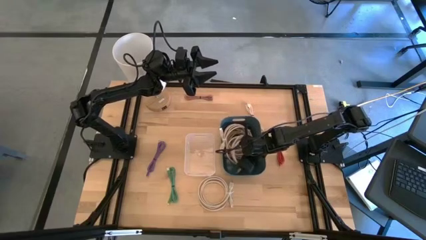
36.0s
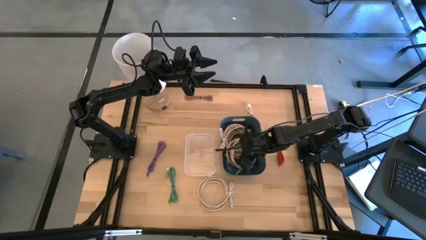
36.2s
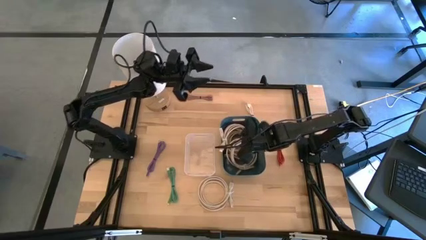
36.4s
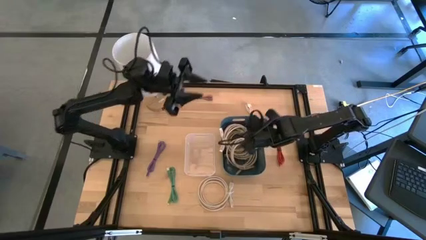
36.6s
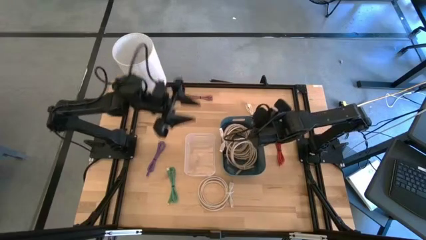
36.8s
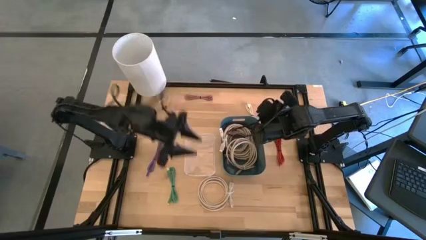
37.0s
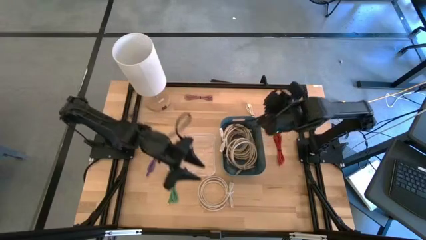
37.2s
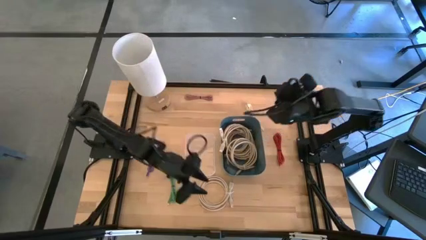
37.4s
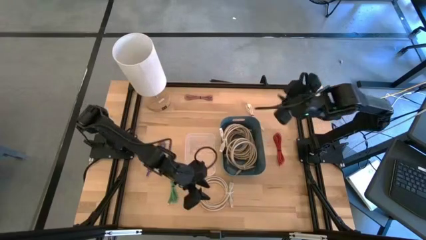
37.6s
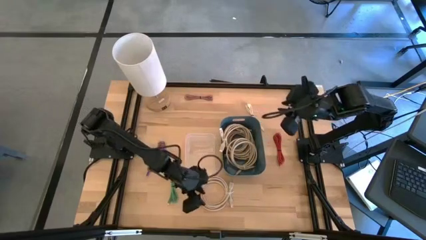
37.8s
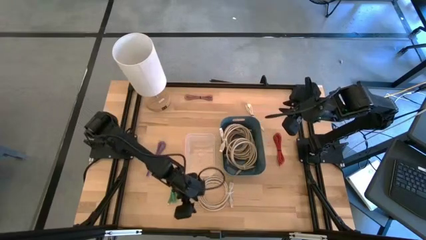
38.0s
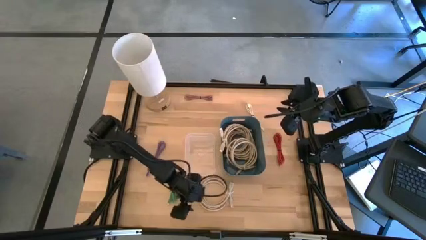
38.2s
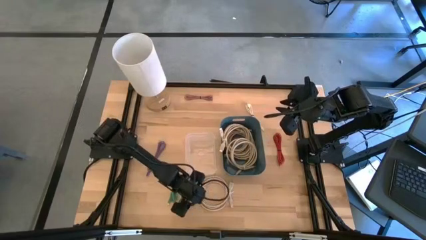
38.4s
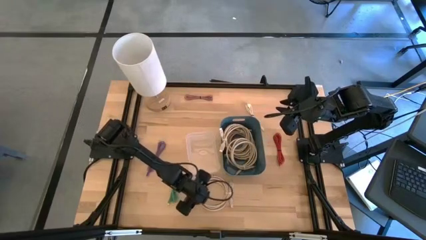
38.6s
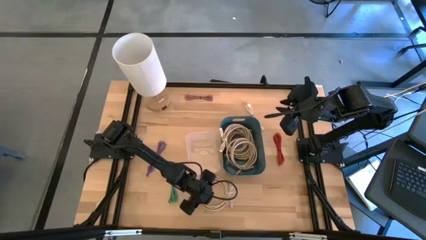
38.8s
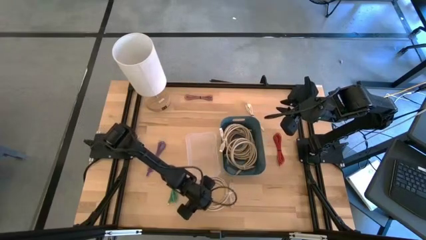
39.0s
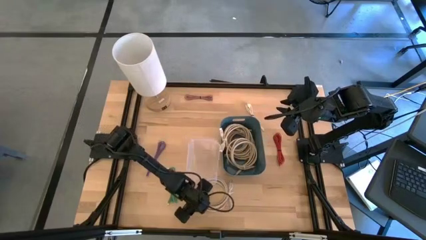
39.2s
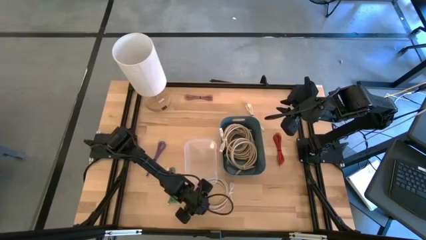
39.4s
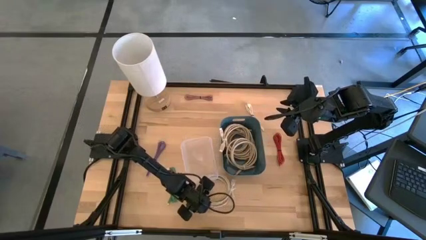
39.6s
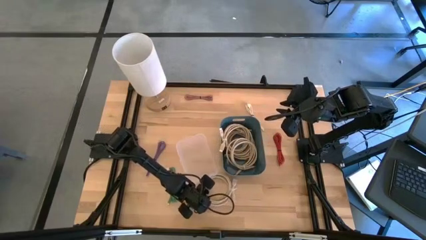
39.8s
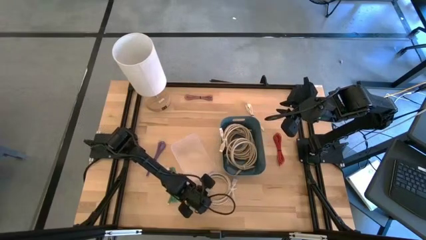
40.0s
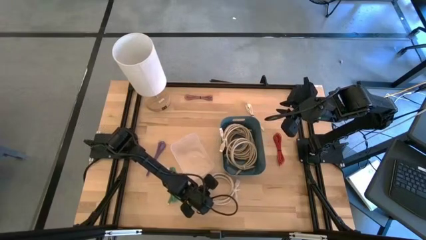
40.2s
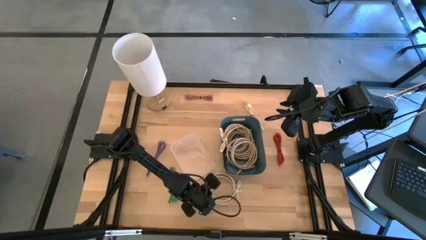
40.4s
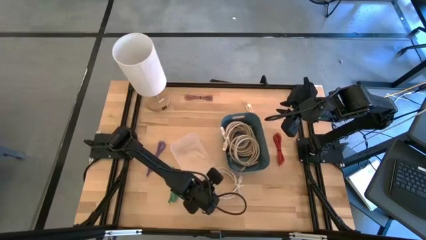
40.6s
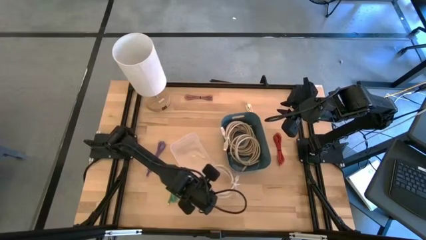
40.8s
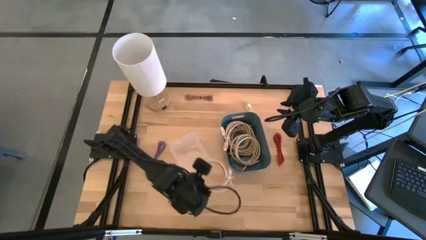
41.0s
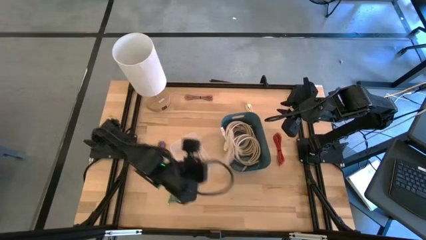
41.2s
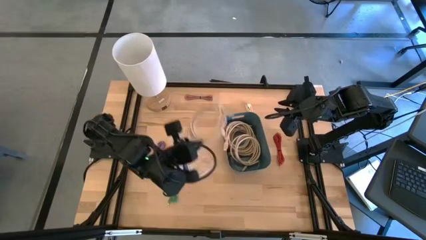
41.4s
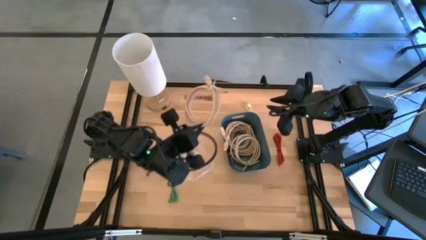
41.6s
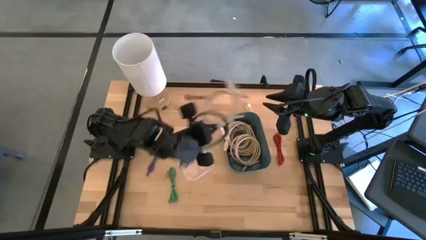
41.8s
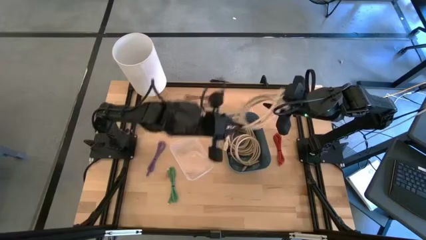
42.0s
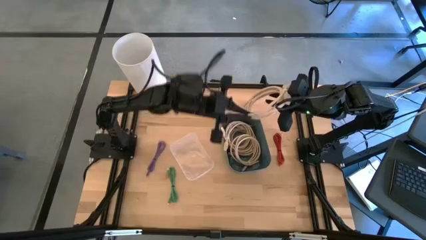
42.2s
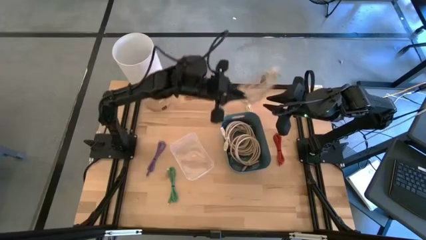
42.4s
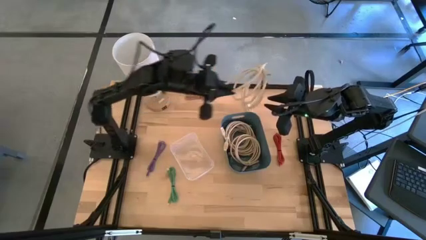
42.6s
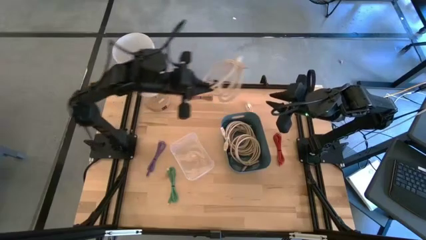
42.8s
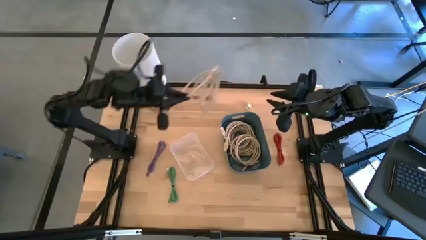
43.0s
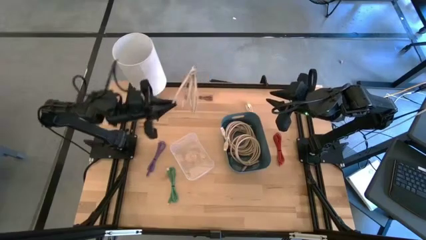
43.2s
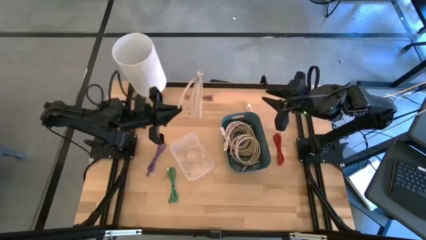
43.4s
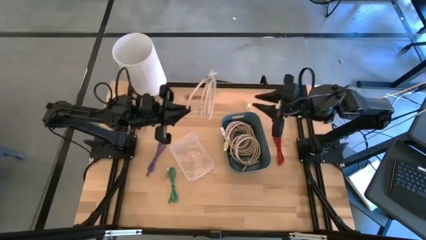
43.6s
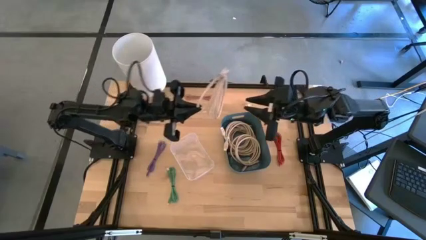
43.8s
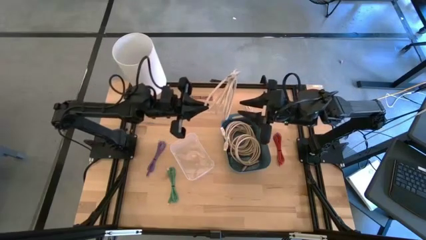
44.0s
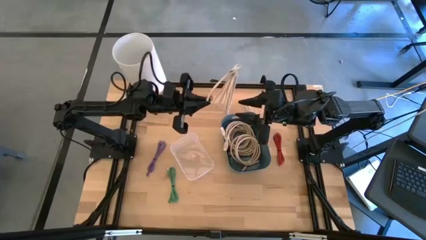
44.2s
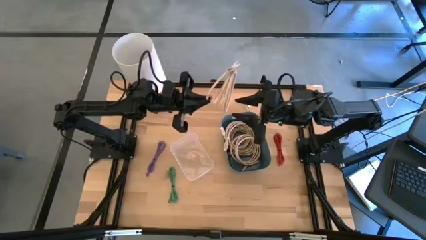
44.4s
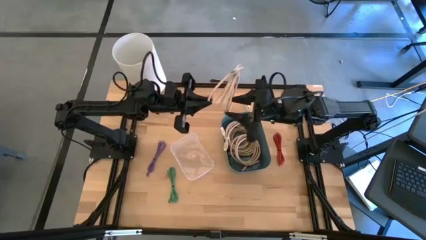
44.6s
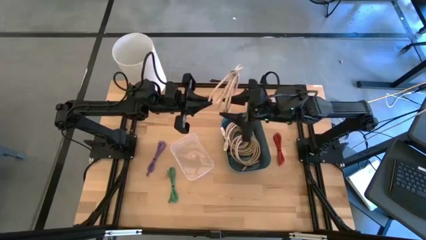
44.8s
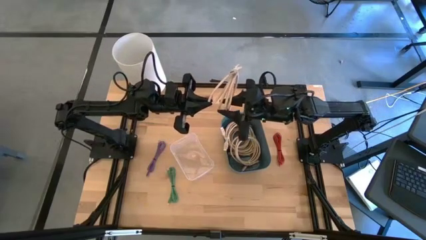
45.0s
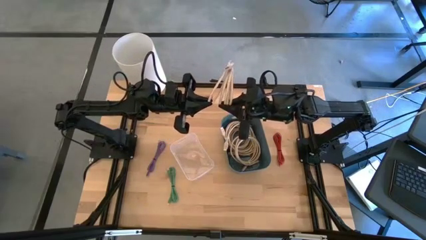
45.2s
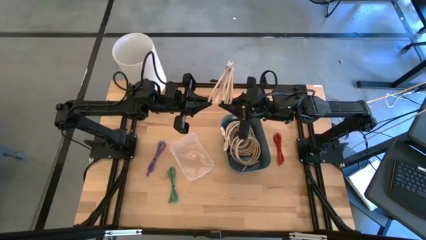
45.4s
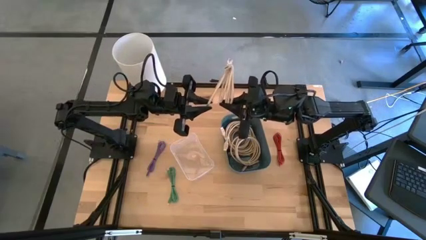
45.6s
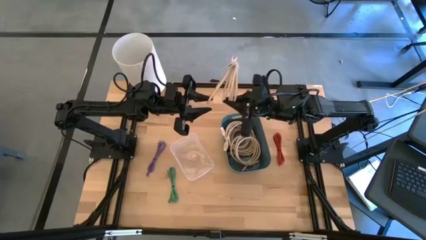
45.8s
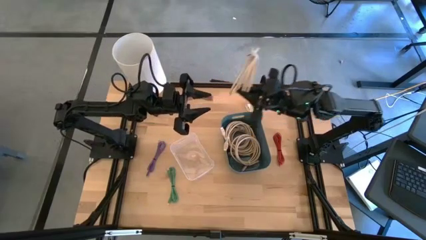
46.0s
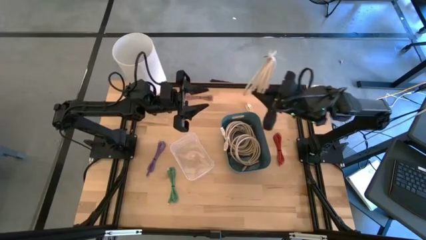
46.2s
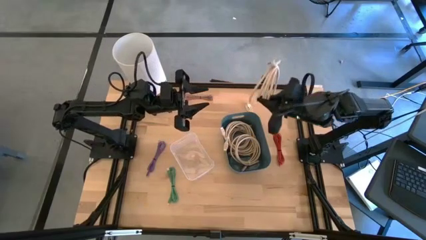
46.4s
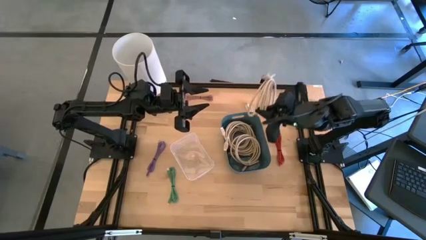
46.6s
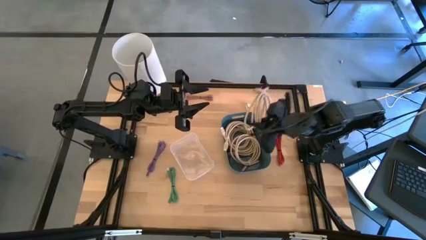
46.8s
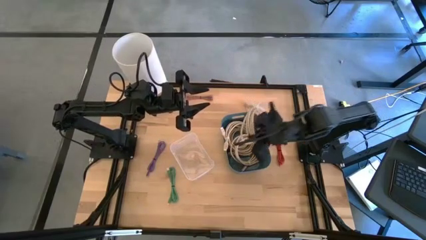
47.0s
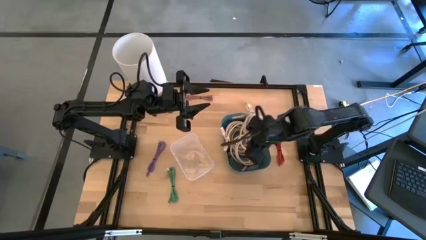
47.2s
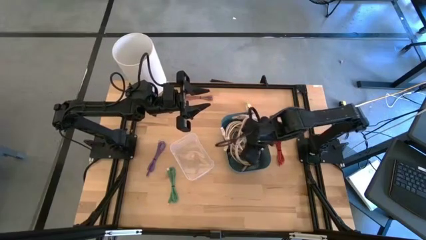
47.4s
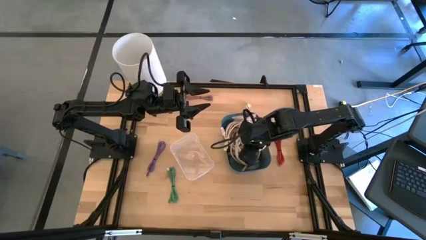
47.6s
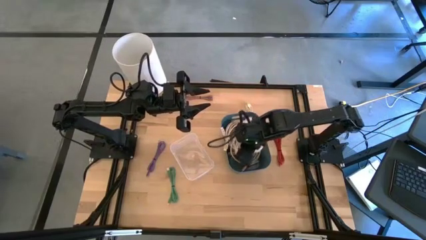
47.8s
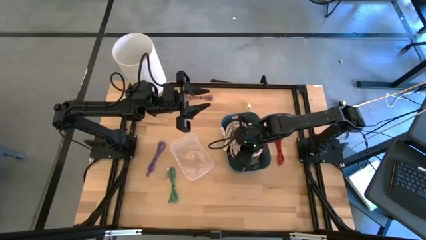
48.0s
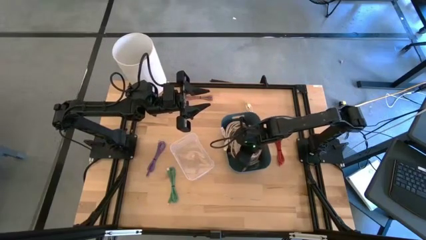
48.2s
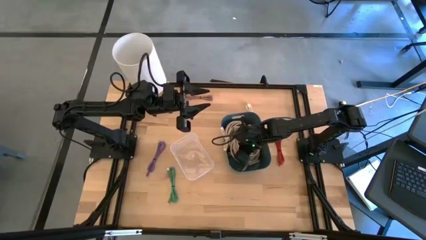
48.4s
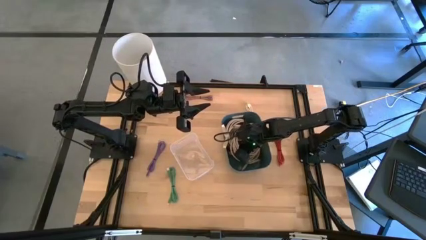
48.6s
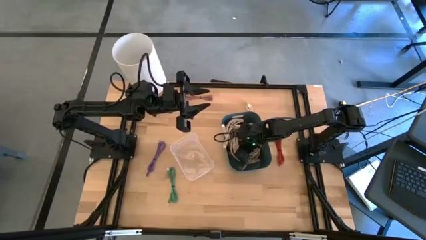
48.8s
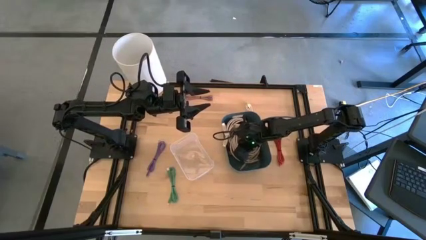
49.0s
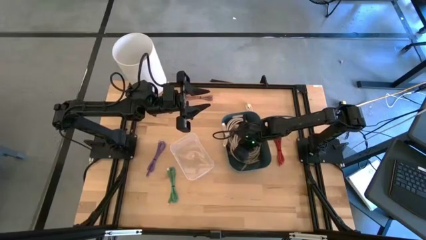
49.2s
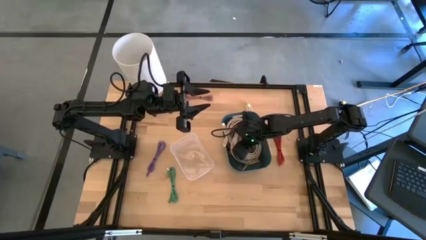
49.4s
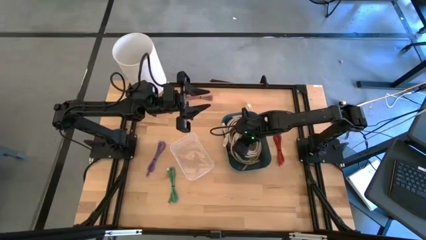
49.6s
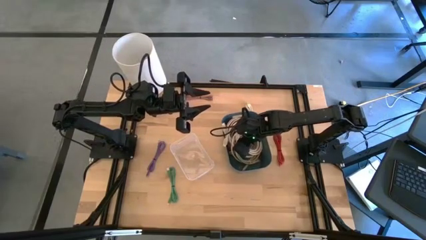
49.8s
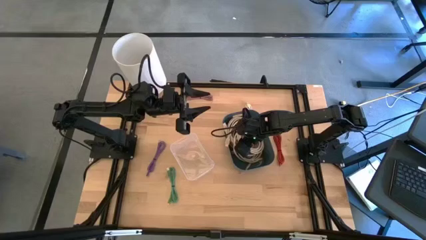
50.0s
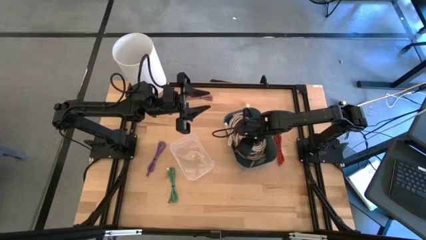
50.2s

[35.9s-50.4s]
Put the light brown HDMI cable into the blue bin

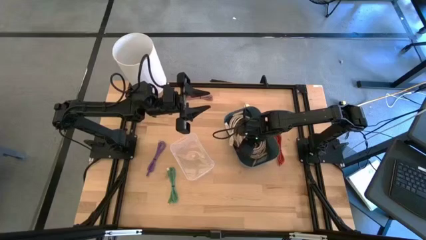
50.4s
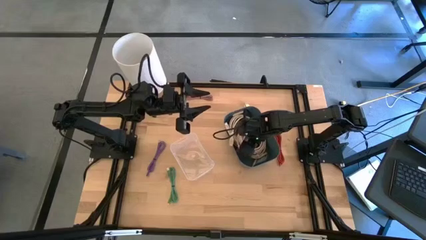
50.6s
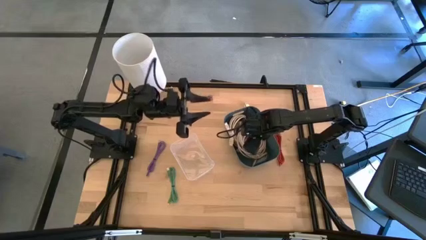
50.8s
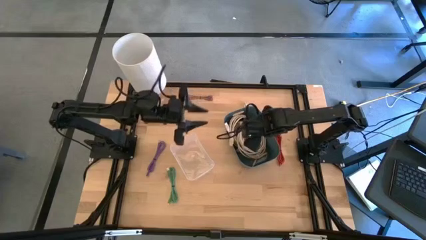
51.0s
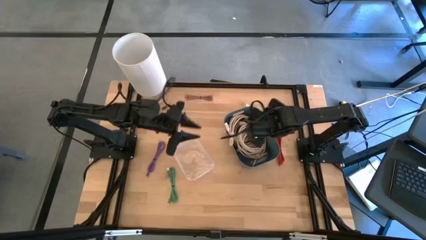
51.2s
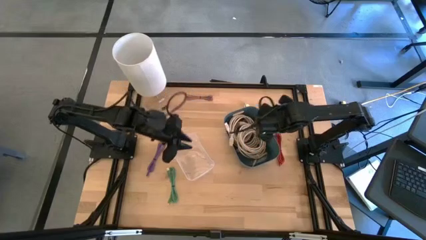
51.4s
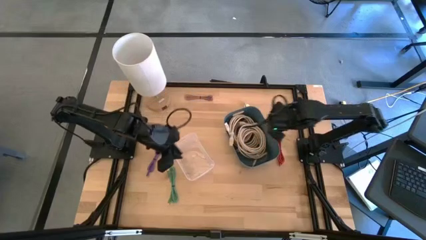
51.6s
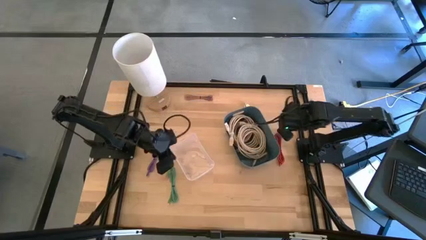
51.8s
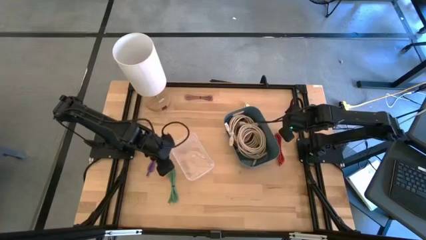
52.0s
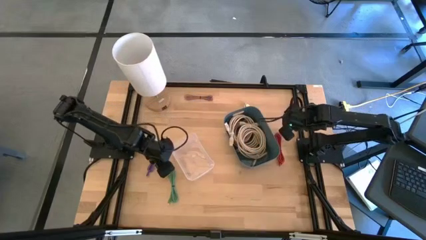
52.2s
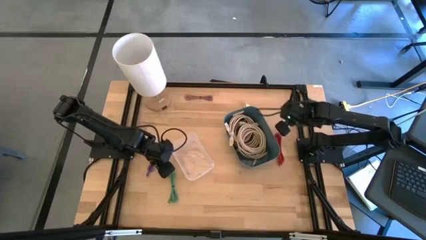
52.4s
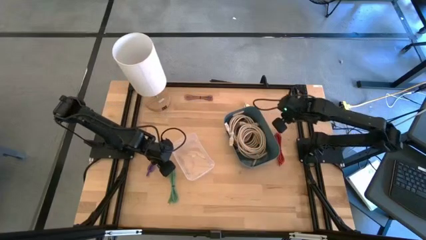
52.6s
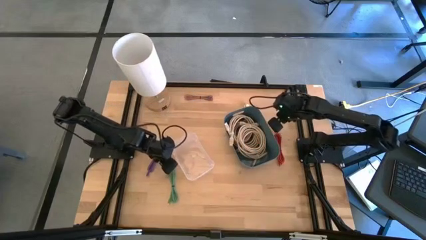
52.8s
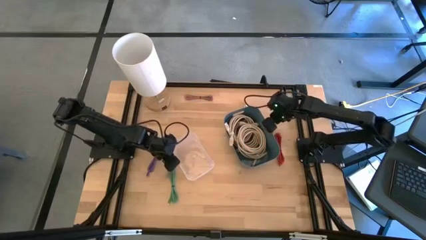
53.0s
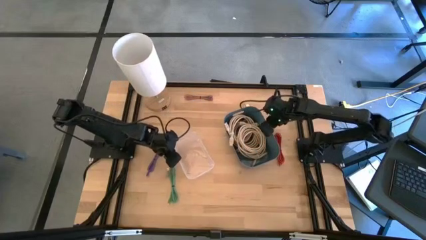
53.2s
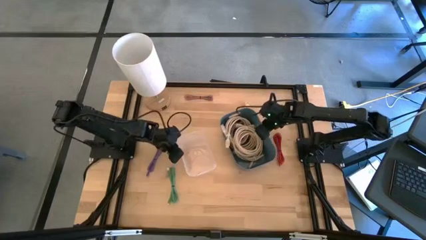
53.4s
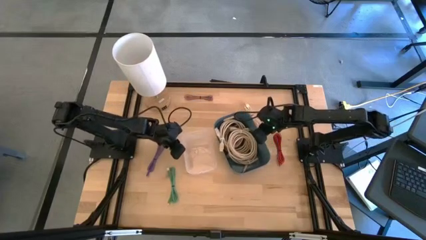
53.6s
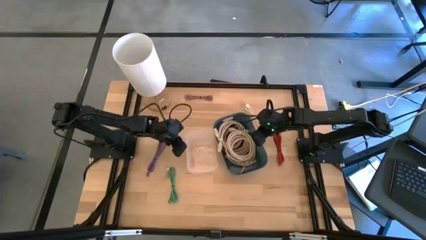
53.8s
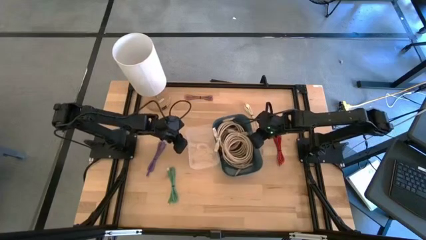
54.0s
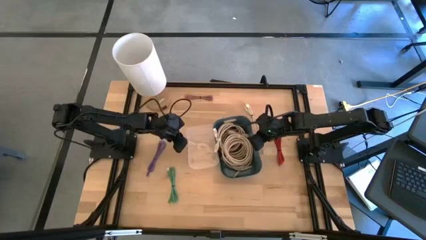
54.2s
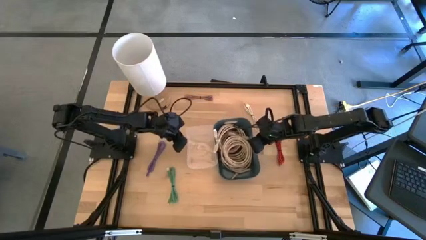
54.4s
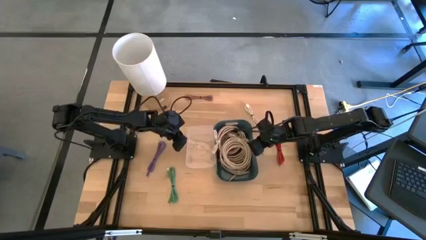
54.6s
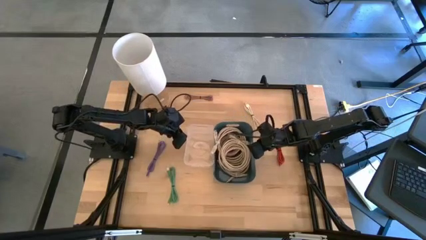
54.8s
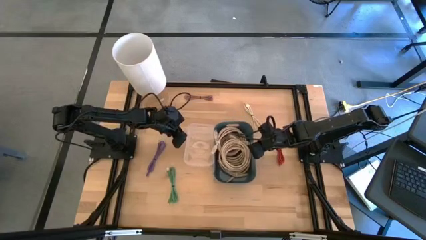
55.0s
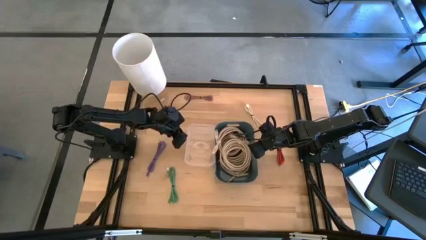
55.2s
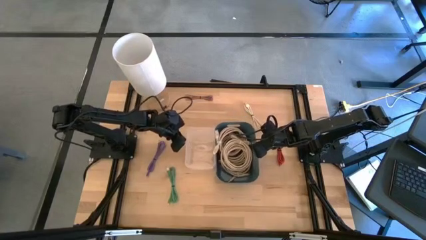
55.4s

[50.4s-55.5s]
Adjust the bins on the table
